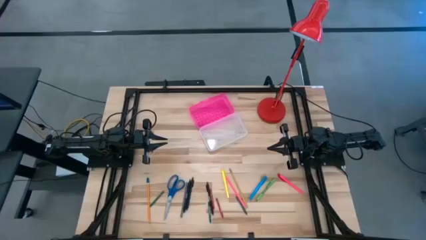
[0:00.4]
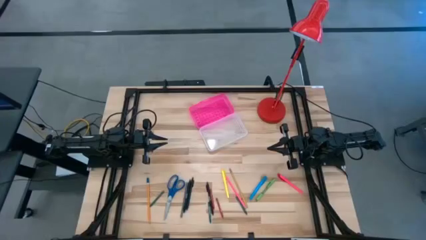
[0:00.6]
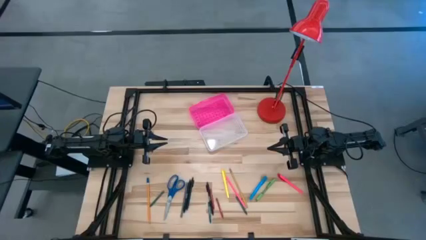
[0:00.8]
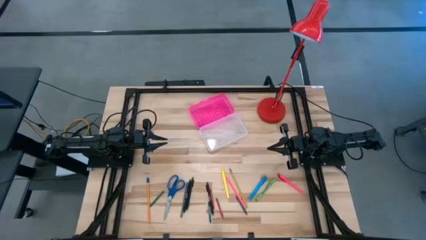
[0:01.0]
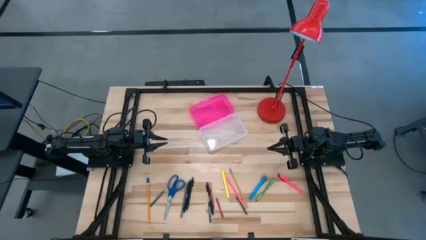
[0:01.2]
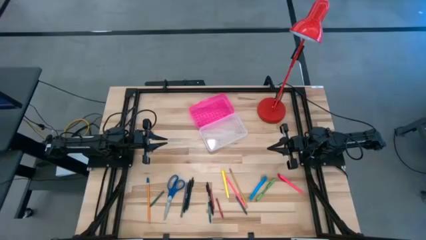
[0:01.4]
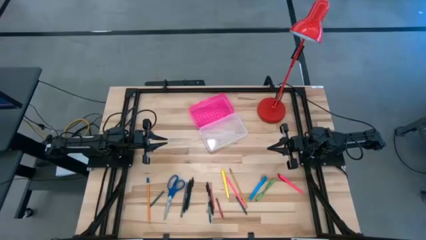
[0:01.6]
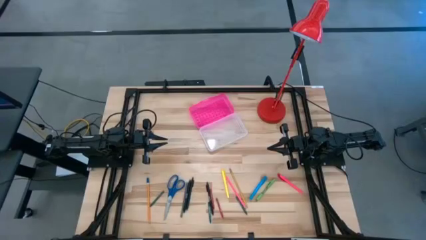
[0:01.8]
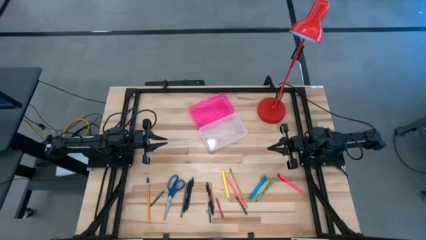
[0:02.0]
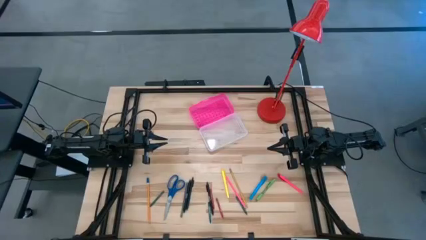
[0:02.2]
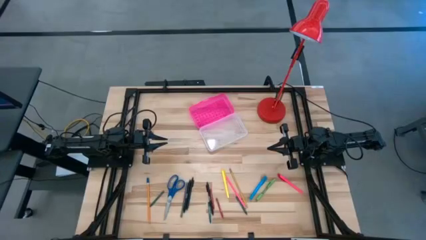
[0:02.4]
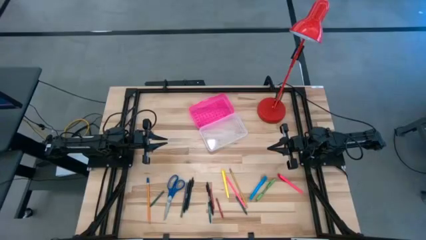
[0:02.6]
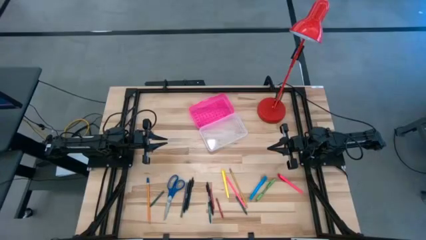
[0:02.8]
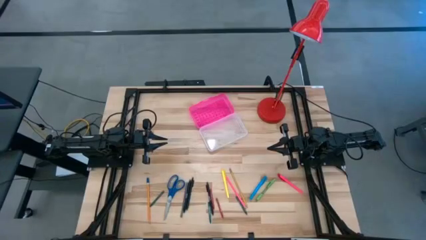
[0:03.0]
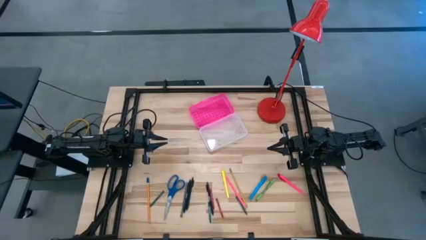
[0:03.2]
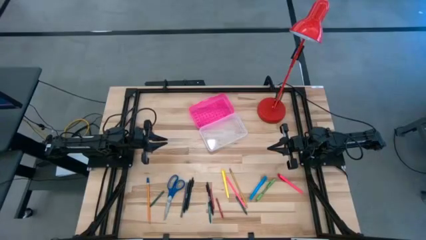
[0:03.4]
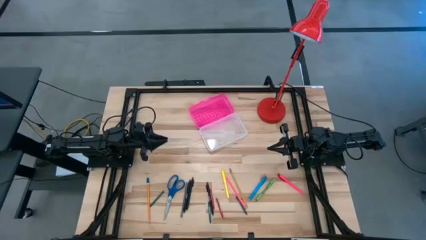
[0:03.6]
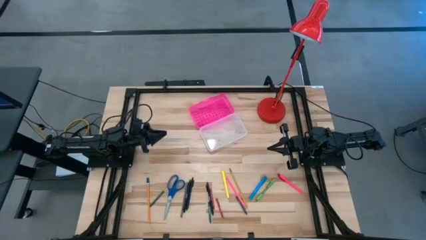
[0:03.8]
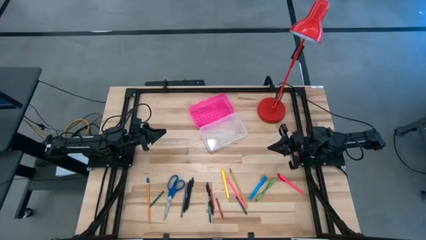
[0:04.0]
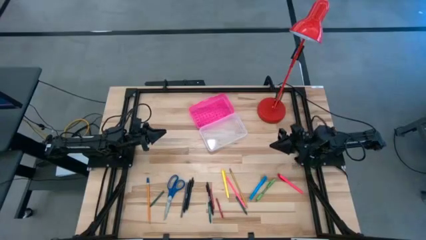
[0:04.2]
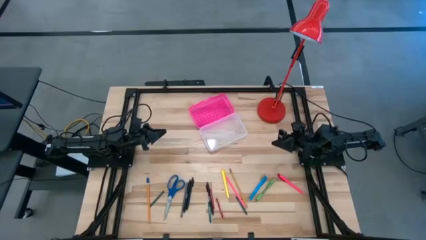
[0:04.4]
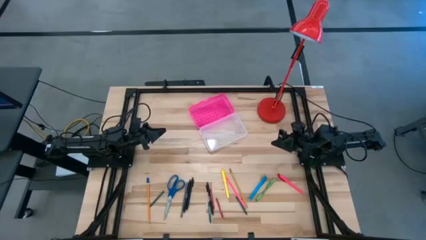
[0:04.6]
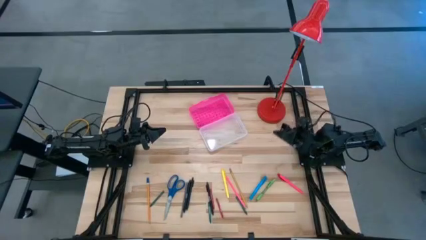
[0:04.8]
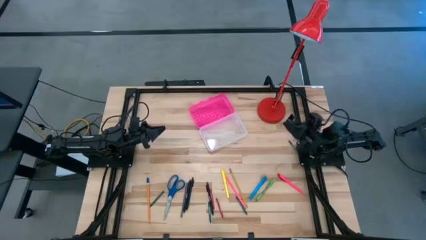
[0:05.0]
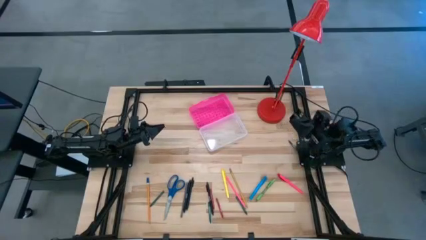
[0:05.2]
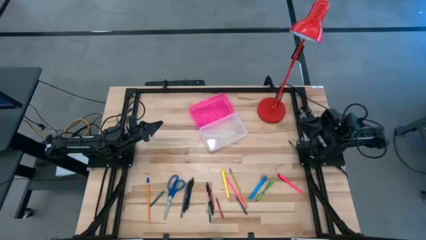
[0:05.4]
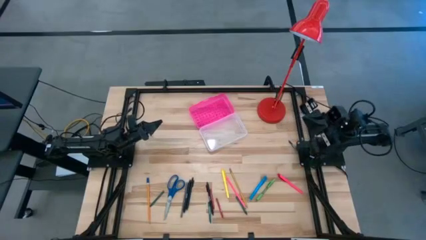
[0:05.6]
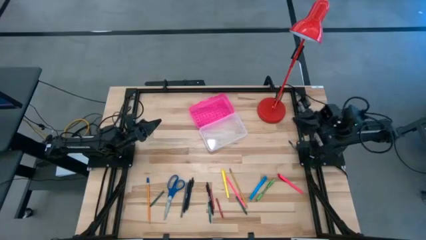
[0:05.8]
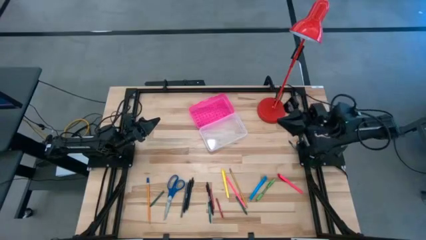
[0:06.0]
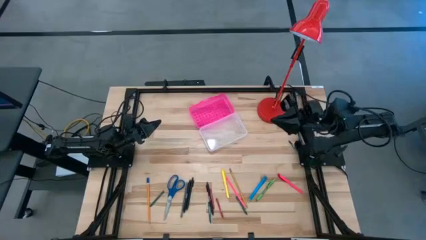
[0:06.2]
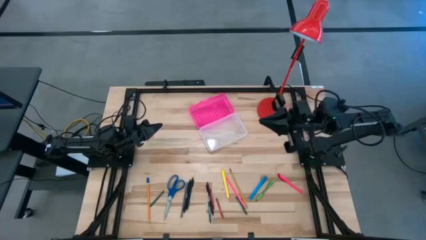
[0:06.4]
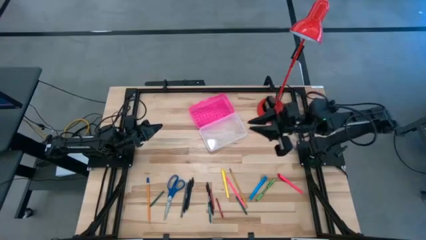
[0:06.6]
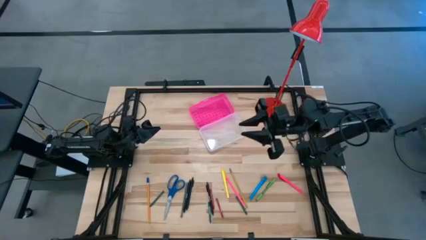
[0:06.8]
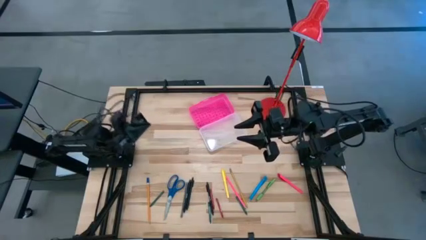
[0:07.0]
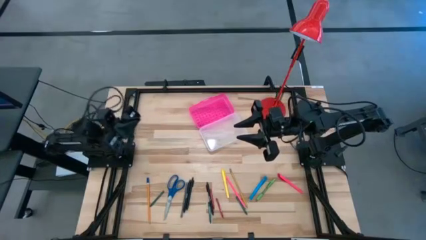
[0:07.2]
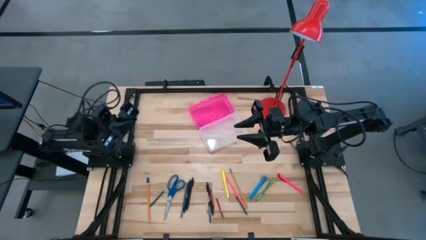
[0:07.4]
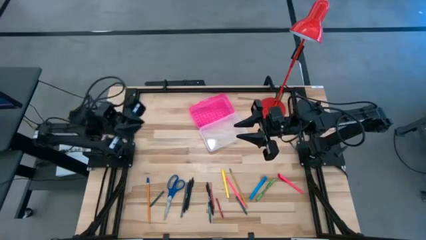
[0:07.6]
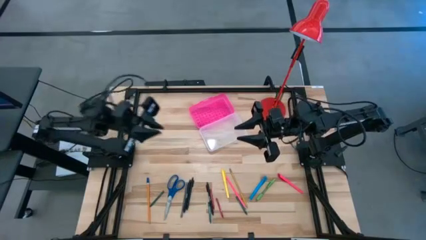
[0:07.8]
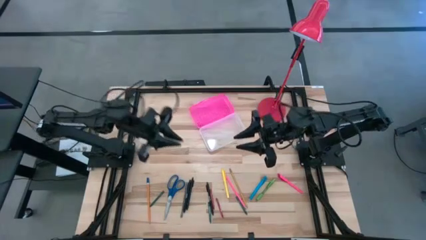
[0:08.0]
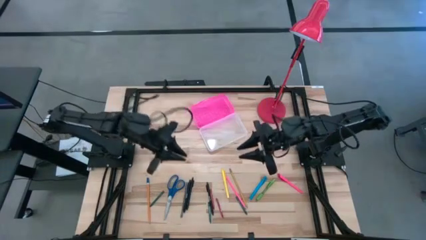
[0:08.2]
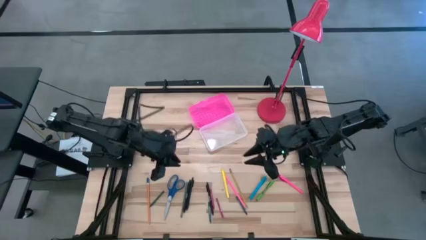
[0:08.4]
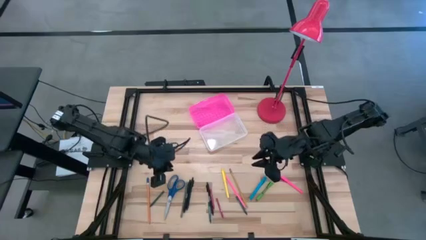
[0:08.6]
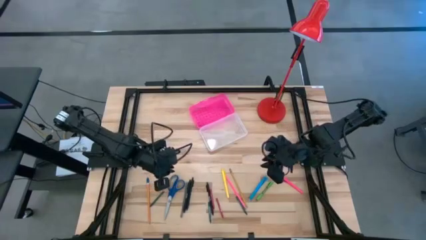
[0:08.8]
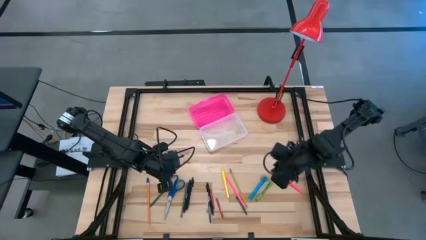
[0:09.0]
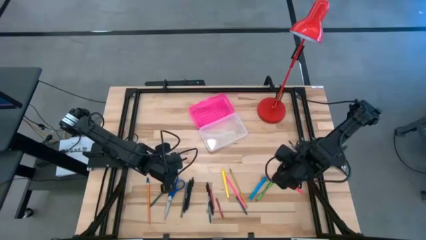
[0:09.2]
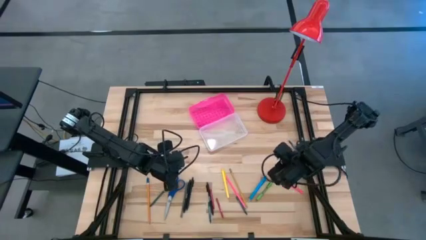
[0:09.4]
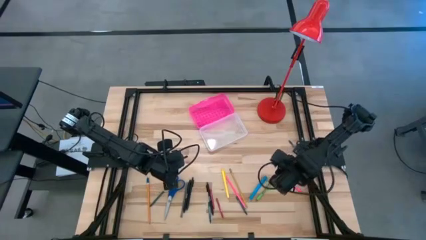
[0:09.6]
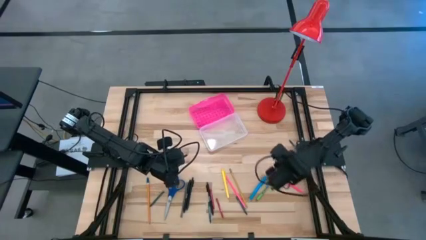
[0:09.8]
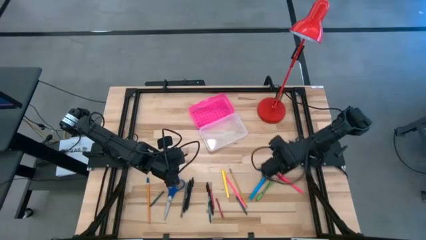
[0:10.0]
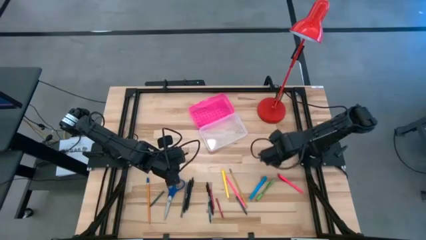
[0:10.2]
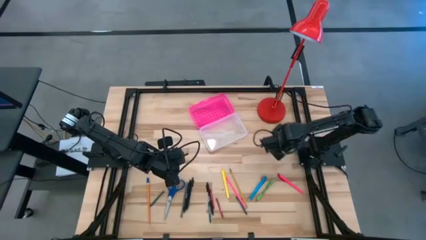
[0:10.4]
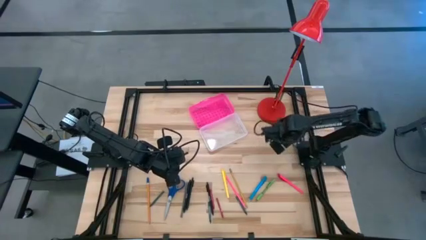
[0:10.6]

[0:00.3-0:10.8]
Task: Pick & place school supplies into a supply box
Put the green crayon into the pink supply box
